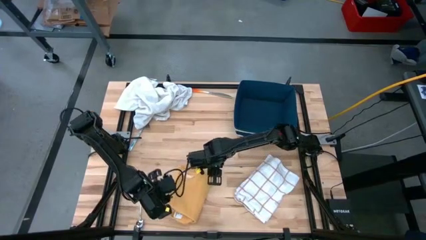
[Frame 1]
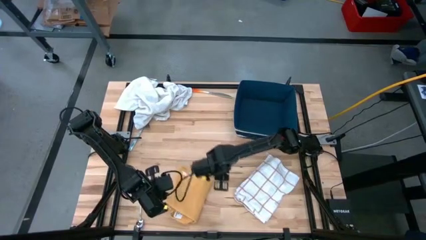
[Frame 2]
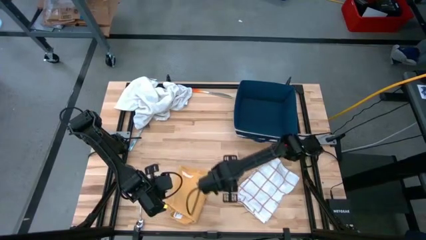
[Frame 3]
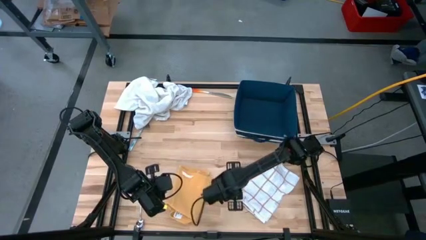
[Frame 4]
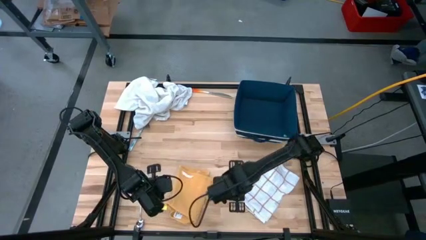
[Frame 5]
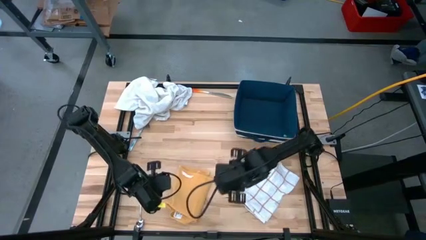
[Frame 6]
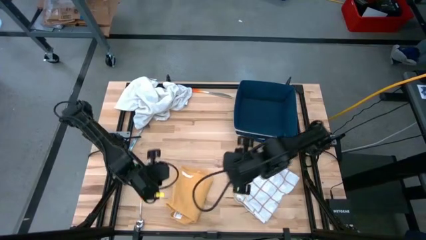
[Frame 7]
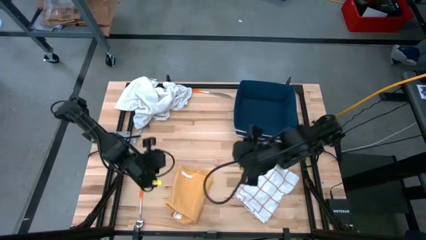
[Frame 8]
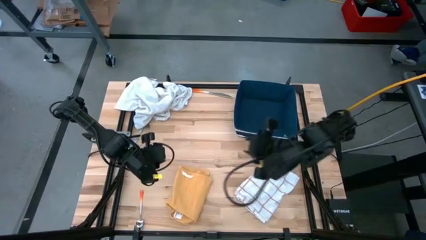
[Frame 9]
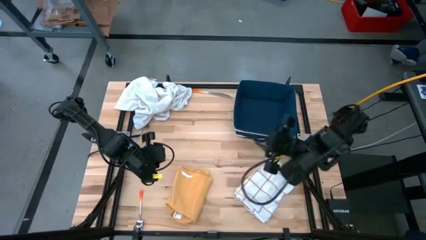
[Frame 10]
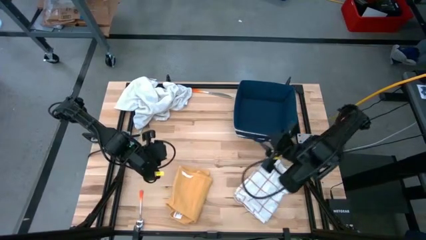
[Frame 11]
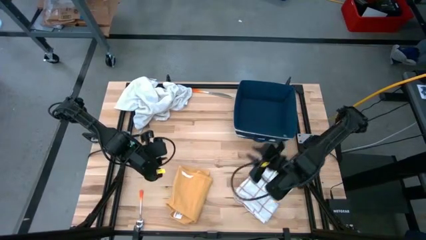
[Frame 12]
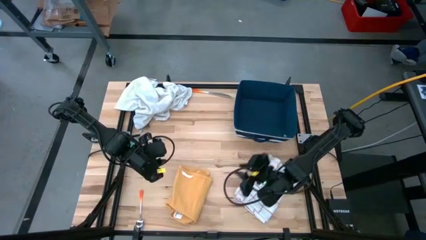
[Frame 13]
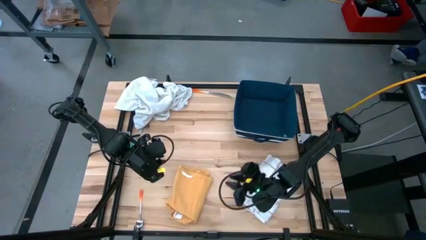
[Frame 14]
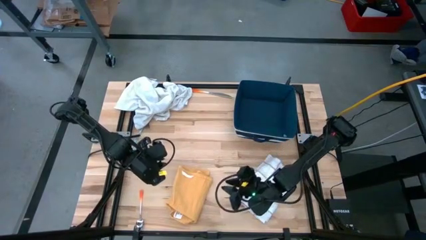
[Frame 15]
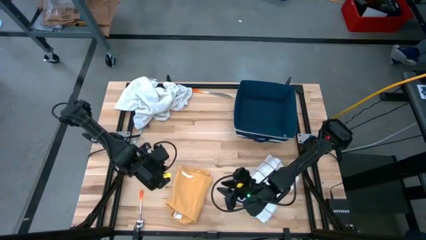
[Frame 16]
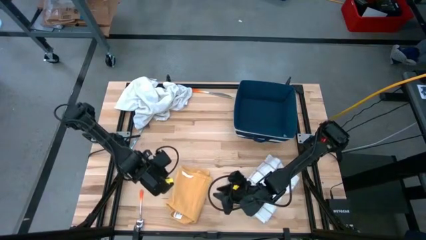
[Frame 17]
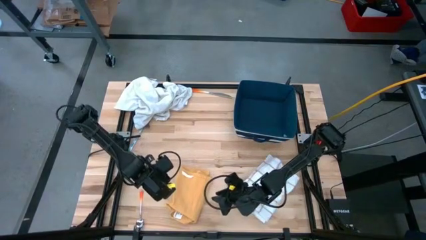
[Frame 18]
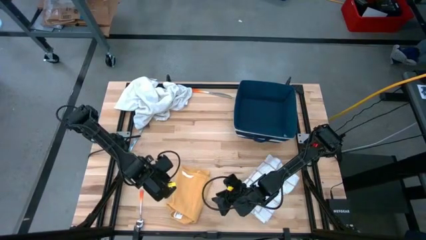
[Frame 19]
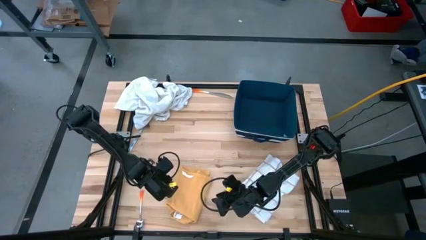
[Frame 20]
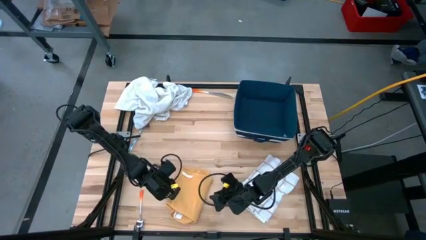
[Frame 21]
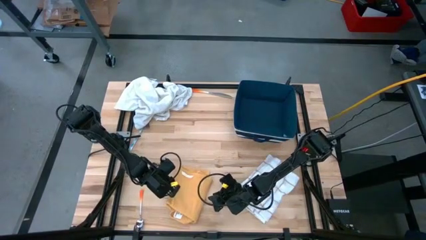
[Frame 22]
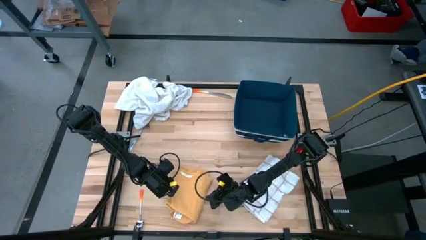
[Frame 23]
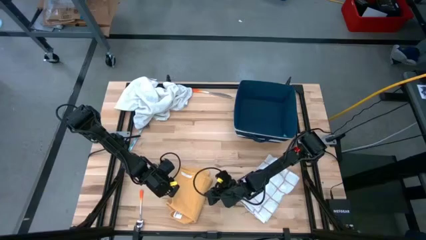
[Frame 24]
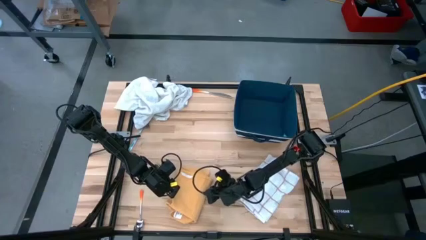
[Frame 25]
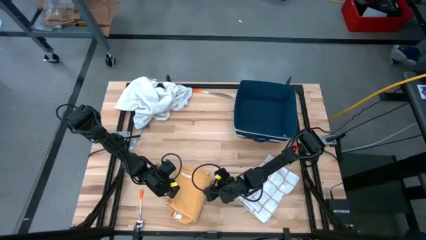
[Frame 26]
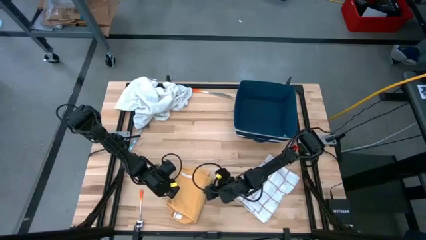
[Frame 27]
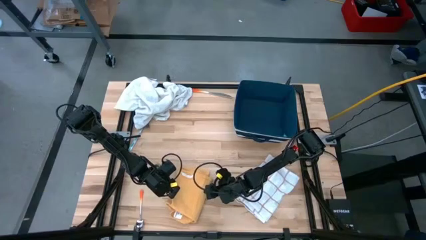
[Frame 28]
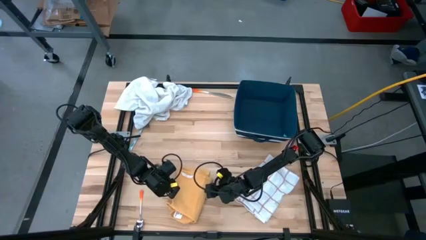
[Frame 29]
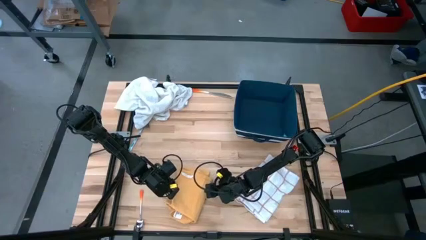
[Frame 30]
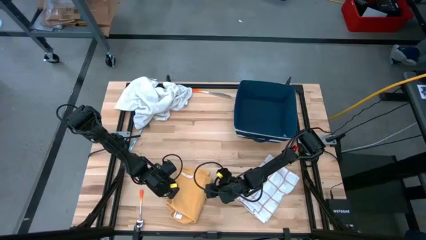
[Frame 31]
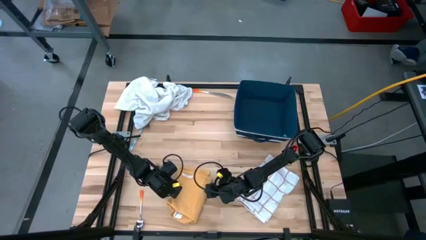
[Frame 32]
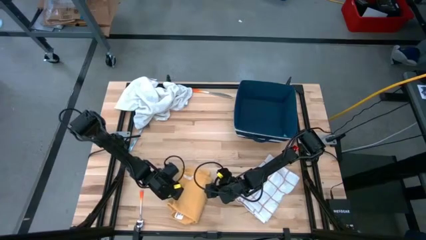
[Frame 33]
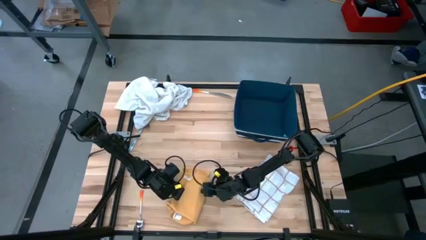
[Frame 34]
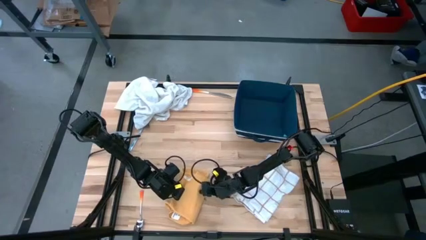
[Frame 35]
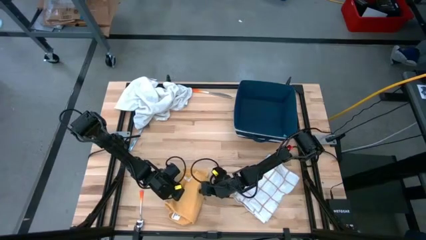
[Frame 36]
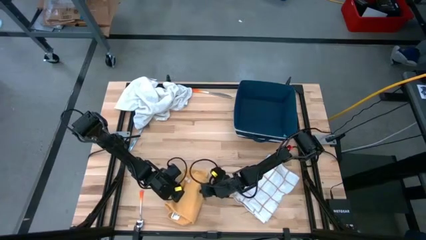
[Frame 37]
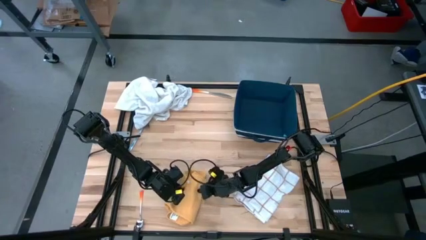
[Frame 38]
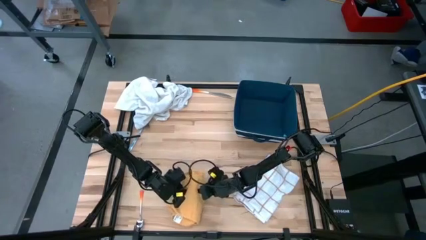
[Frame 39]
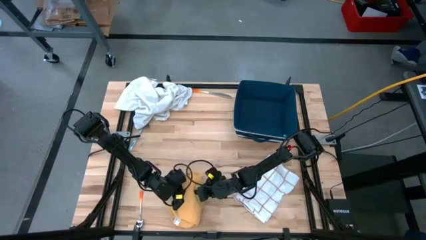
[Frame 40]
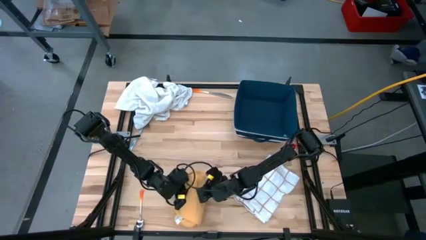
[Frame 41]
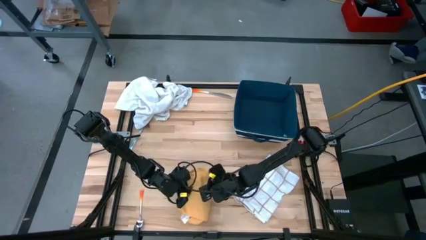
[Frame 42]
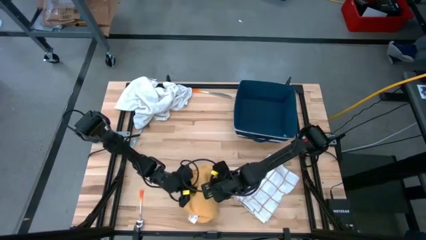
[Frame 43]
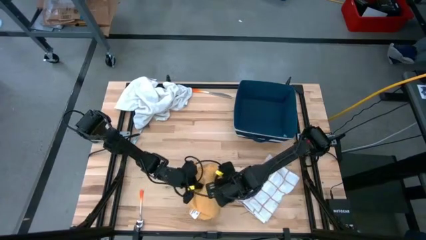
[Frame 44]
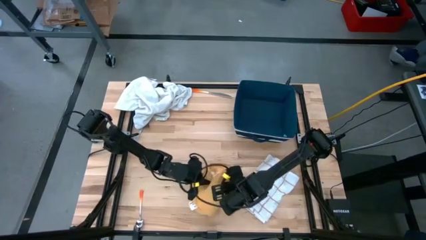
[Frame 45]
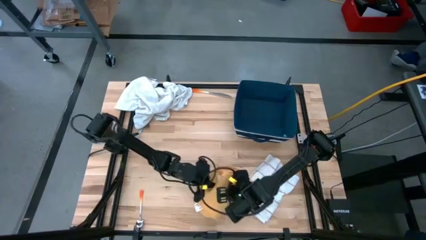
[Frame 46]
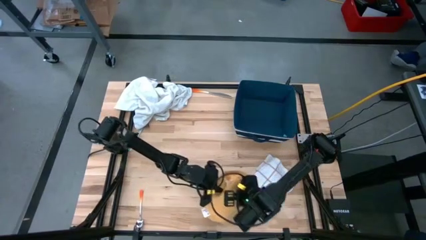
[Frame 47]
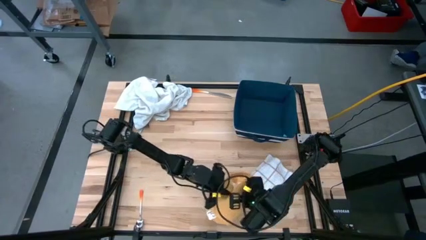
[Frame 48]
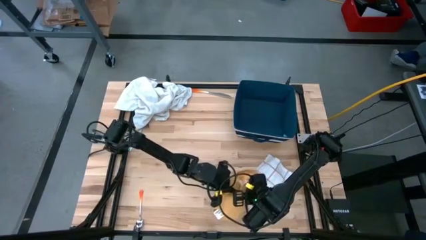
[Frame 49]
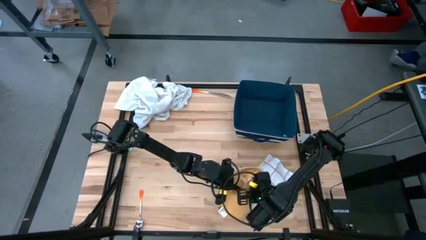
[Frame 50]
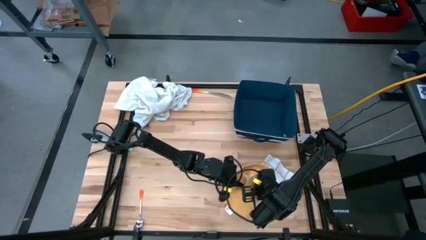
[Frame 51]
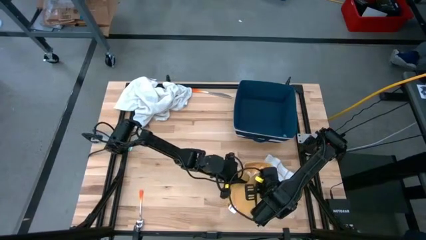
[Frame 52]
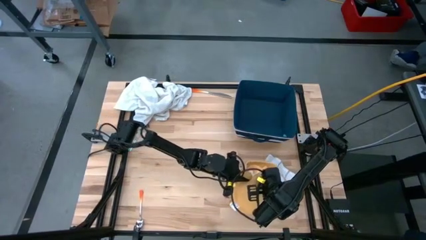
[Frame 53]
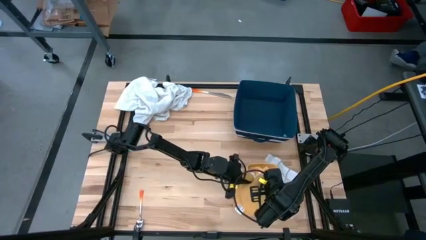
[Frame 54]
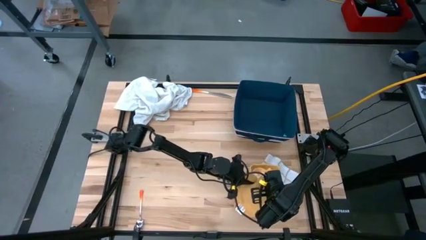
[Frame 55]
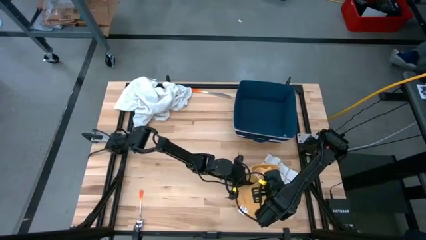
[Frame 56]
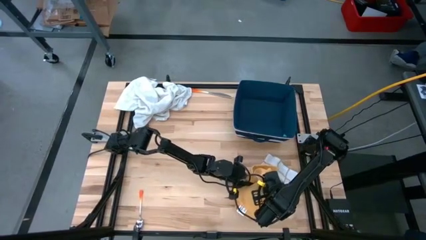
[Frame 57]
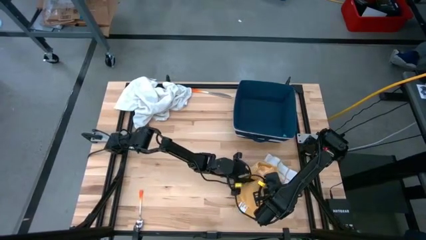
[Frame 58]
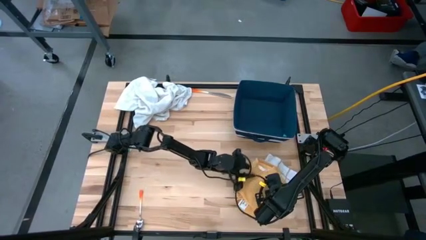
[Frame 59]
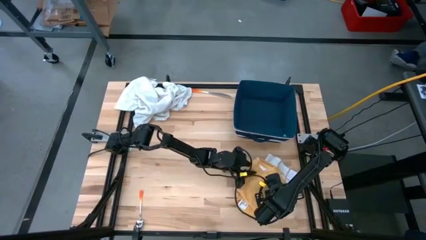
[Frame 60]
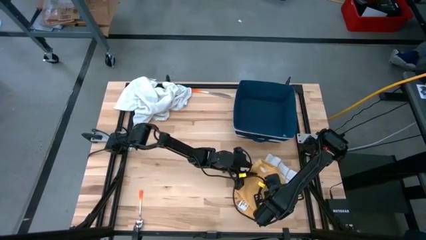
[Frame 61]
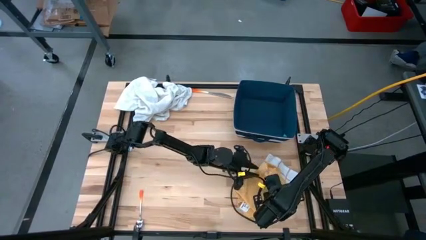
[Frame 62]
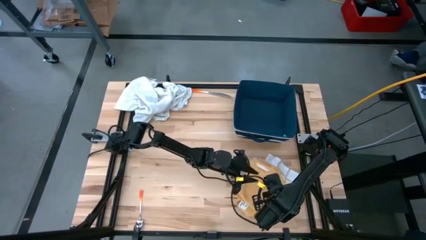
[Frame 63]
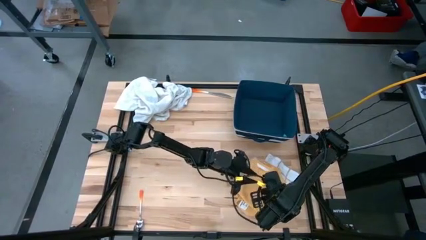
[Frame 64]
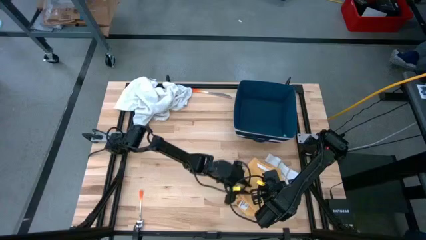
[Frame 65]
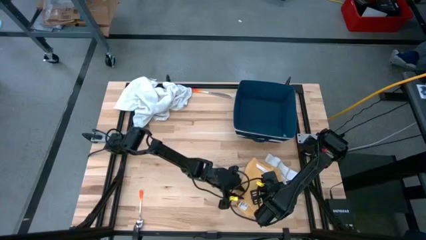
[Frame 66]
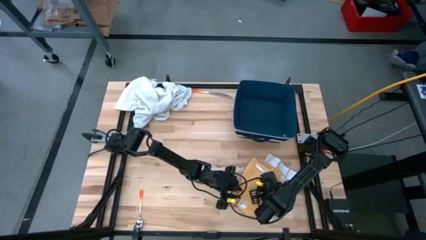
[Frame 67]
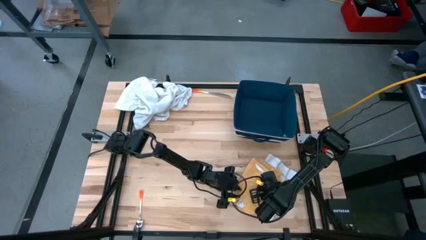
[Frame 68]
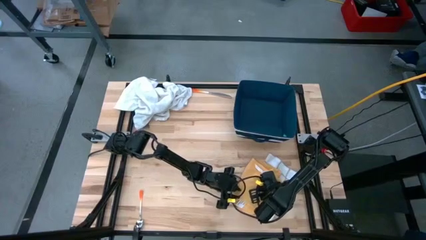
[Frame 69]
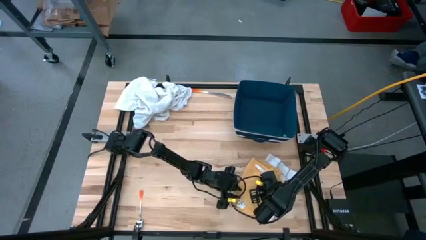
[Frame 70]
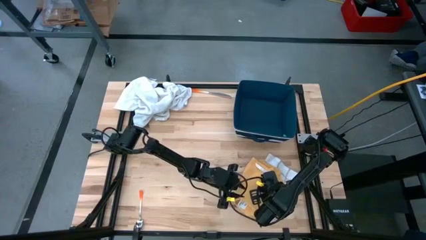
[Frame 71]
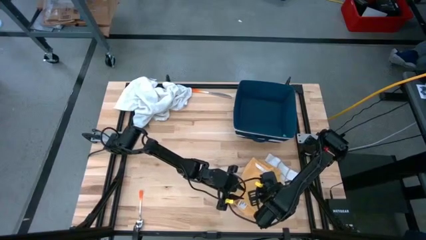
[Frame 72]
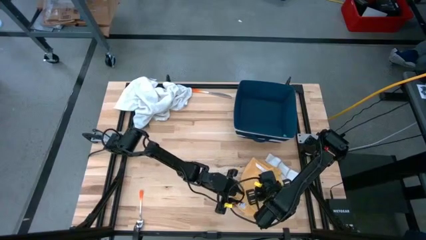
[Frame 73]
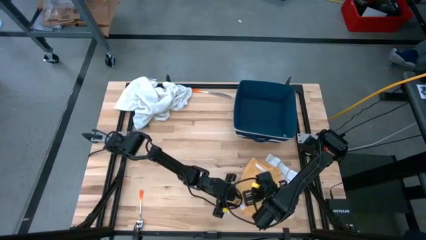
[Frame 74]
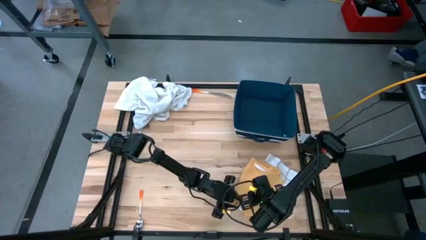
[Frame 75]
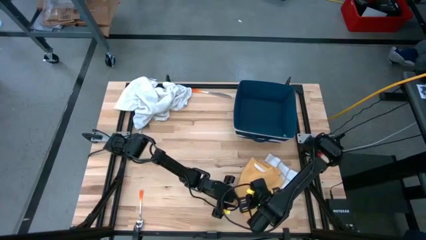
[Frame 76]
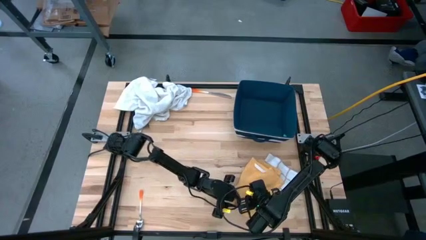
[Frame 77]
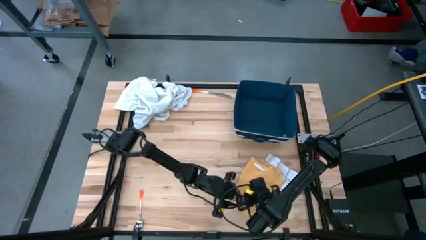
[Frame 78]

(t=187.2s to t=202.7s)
Task: Fold towel
Stack the yellow towel on top of the white-and-brown checkered towel

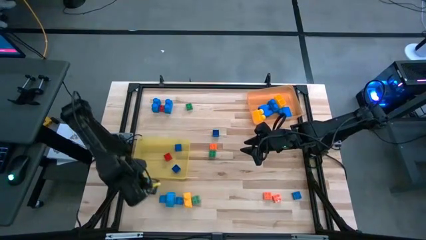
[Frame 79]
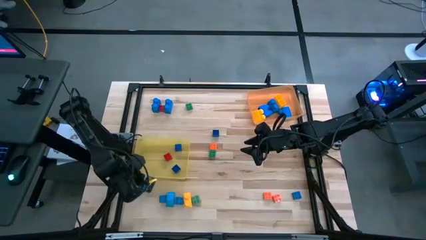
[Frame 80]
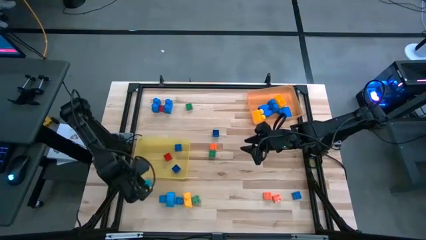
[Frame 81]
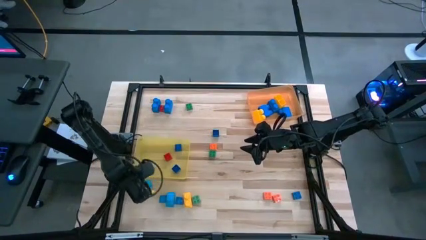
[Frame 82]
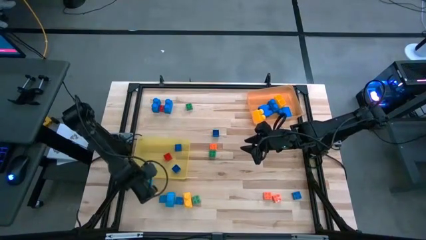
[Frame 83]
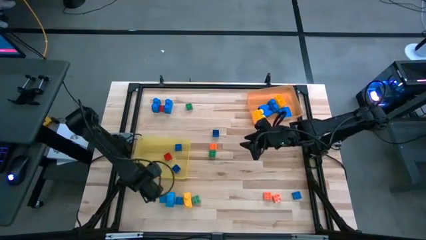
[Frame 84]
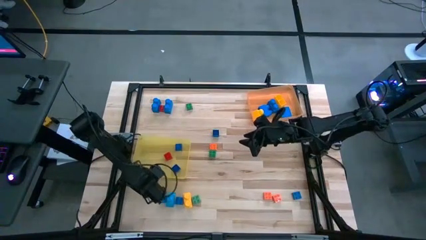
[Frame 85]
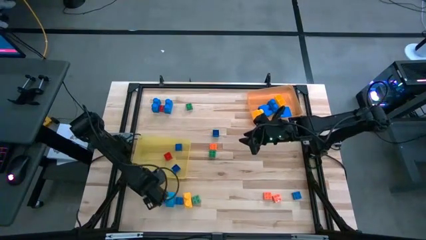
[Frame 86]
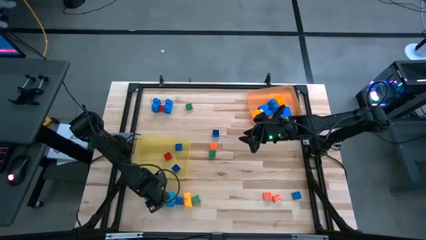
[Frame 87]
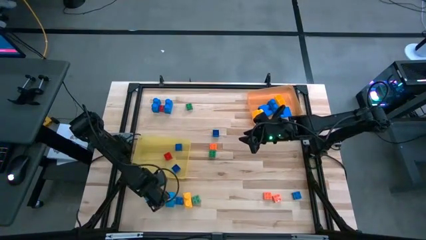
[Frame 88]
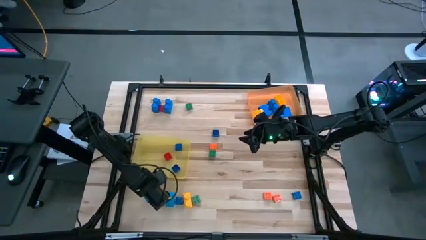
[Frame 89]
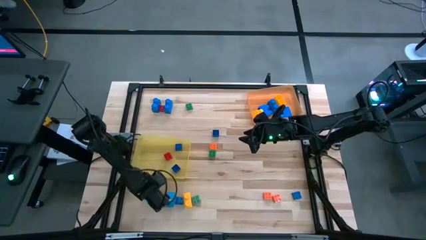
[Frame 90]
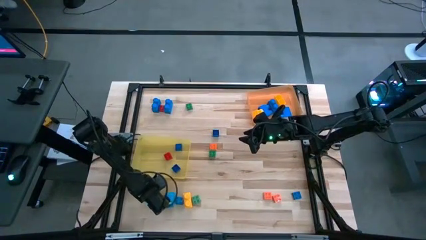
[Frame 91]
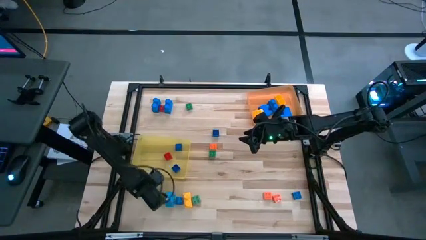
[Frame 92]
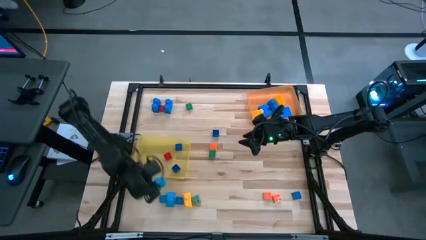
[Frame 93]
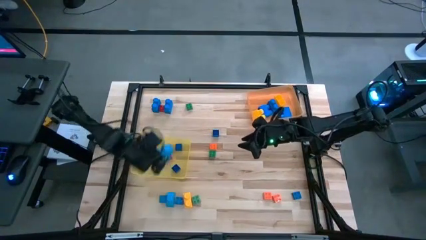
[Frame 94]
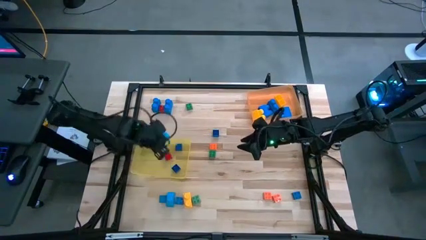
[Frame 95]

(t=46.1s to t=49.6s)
Task: Sort blocks by size
Put the blue 1 stud game piece into the yellow bin
